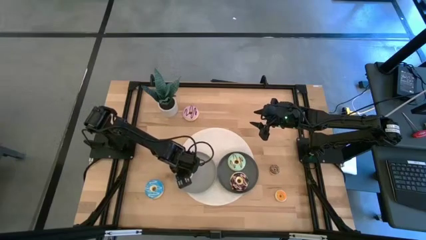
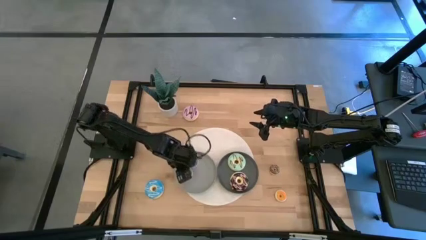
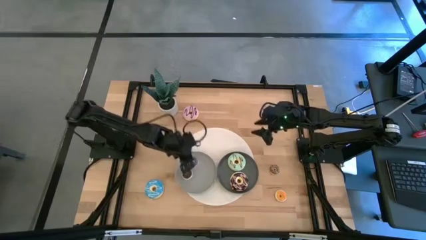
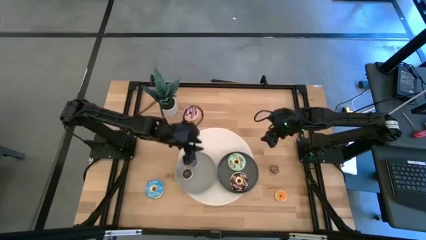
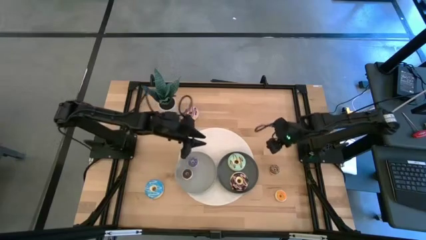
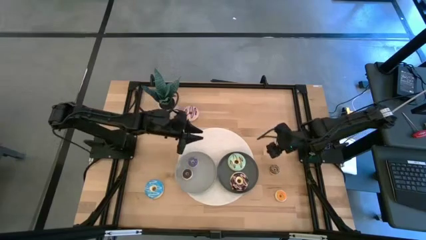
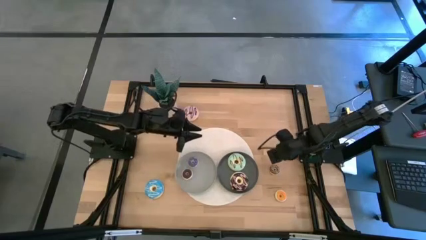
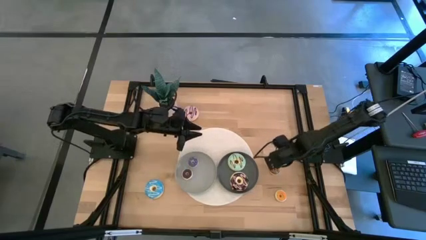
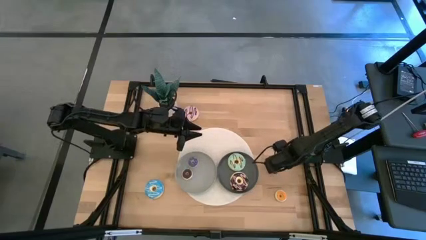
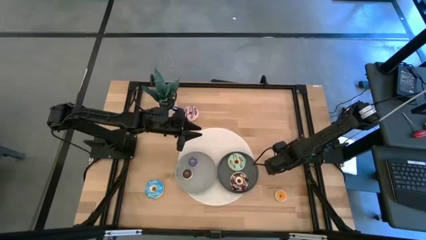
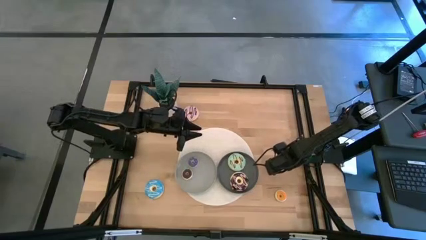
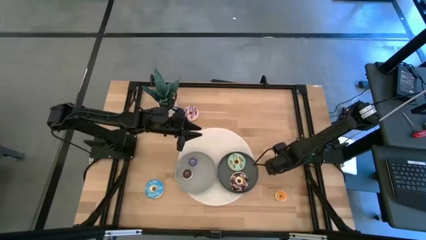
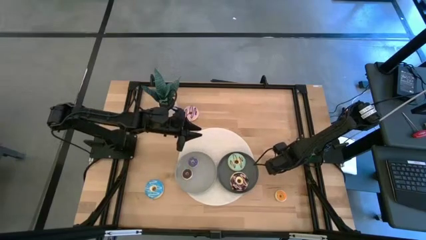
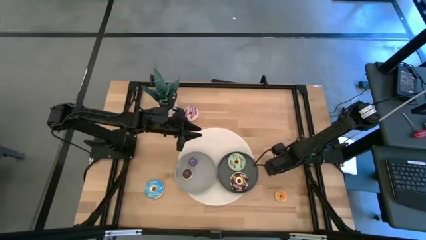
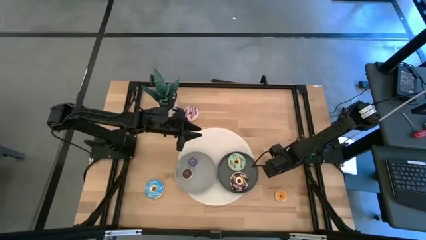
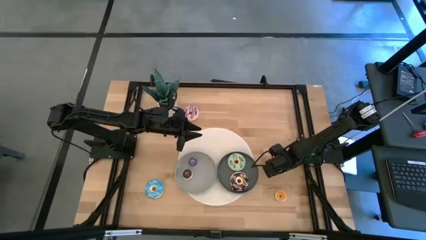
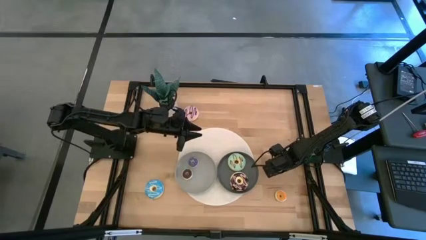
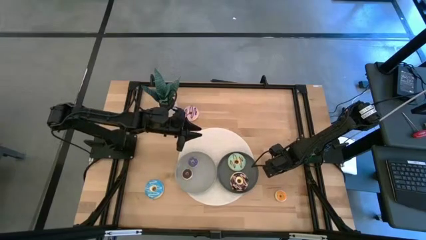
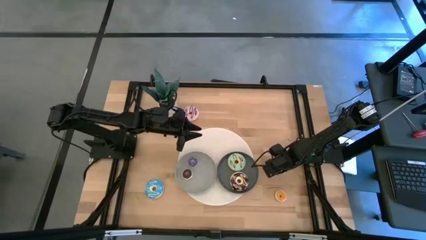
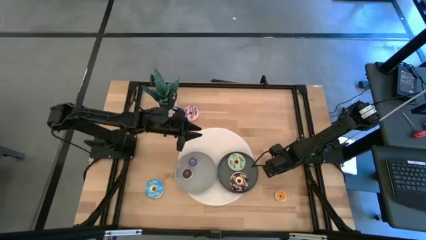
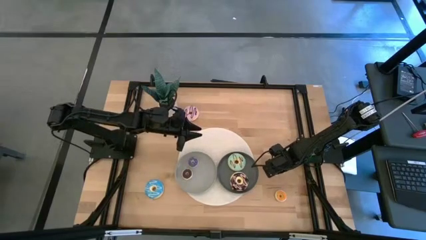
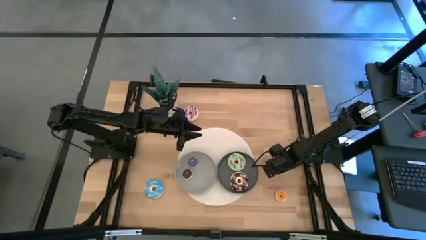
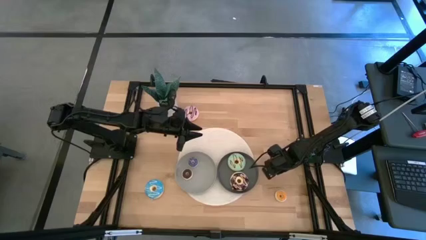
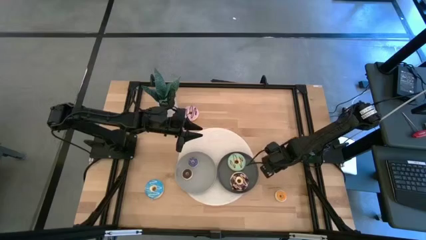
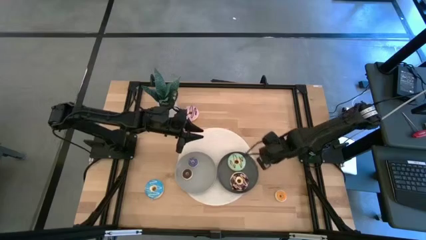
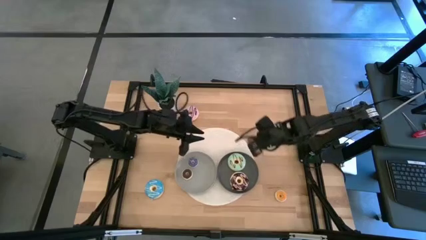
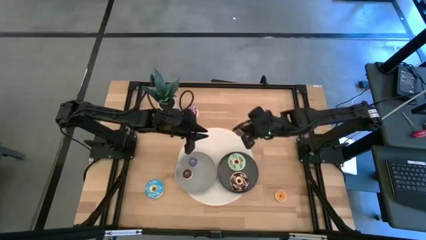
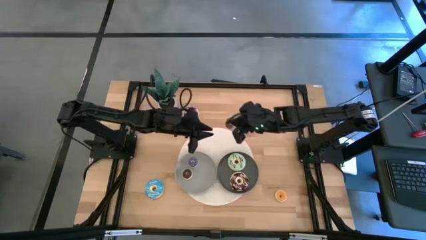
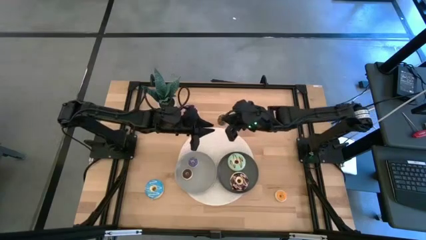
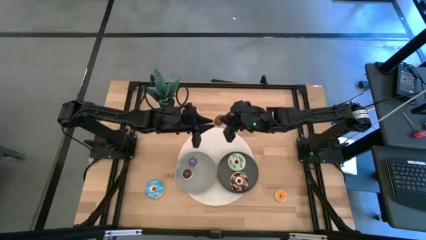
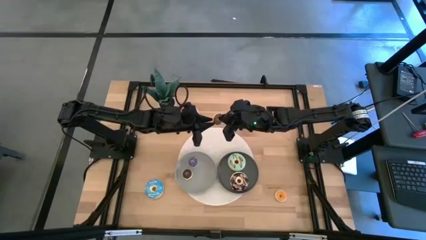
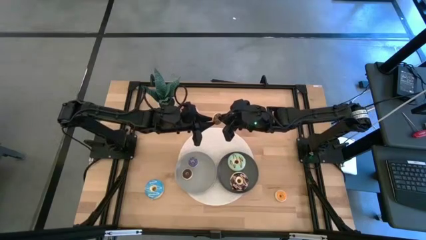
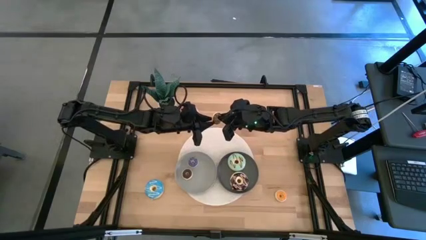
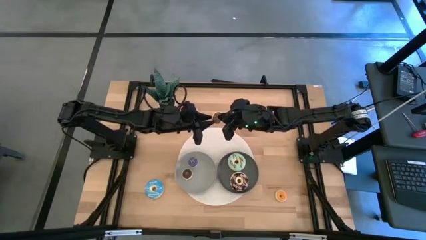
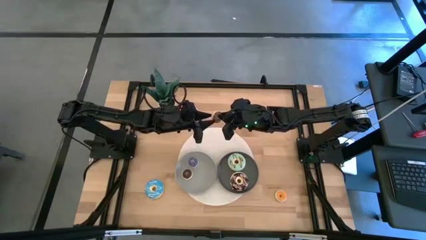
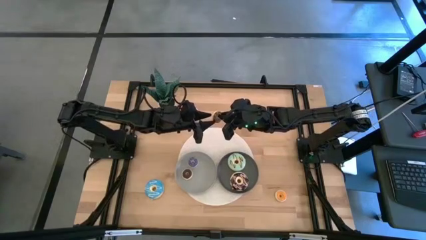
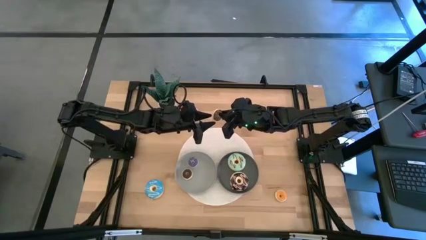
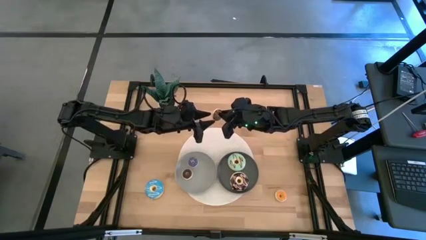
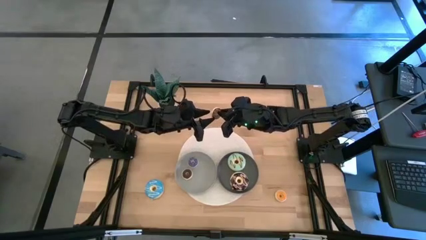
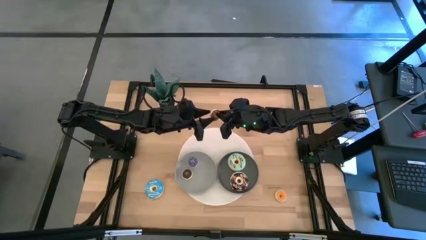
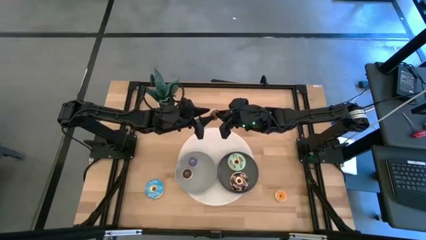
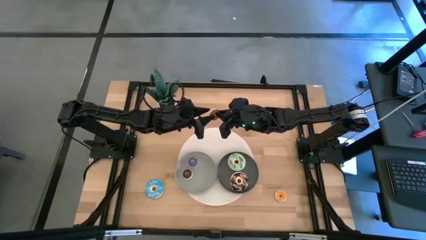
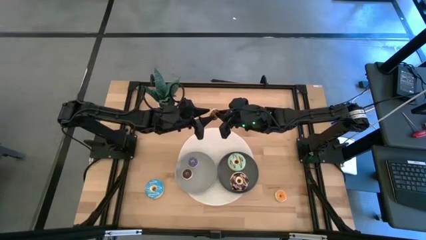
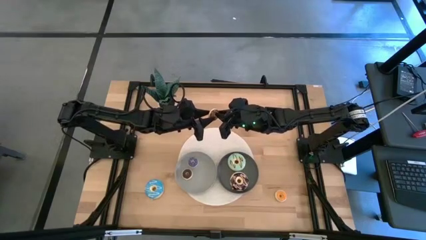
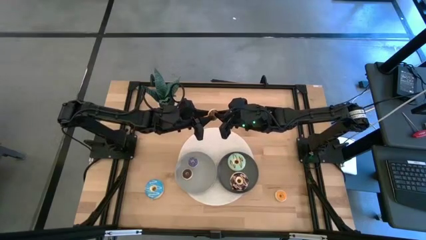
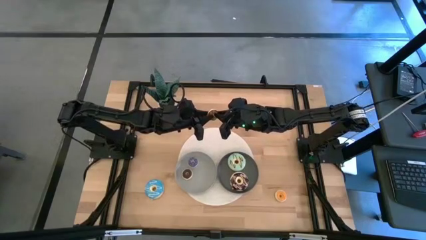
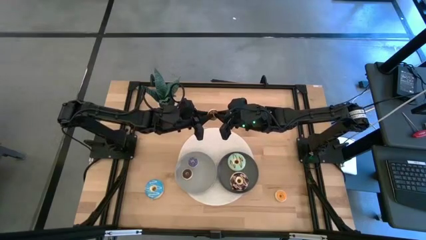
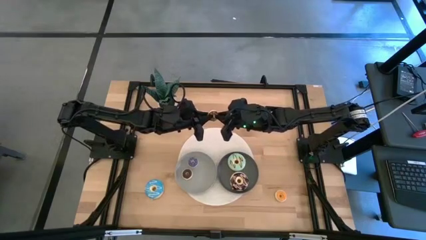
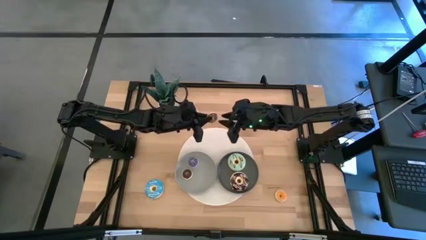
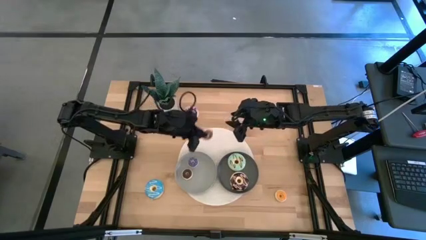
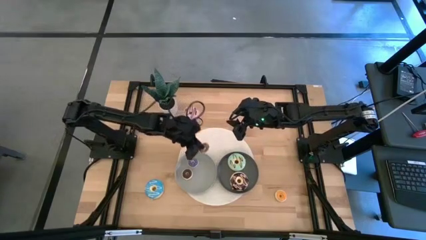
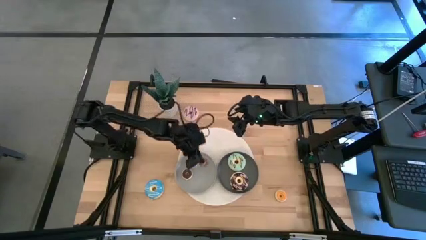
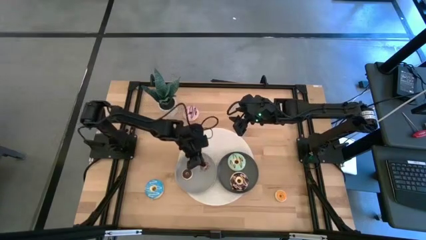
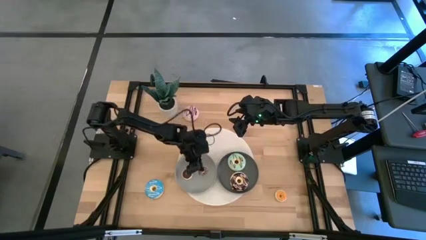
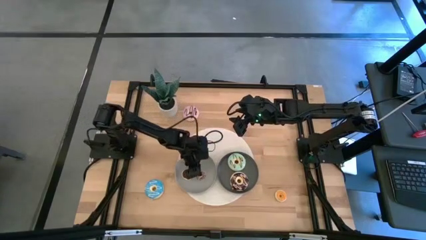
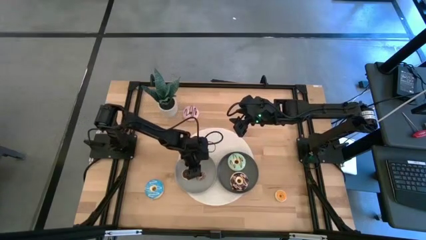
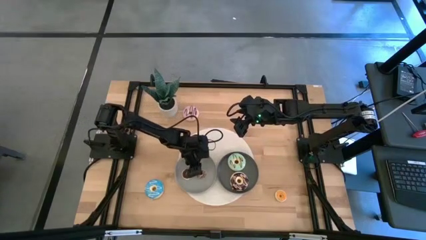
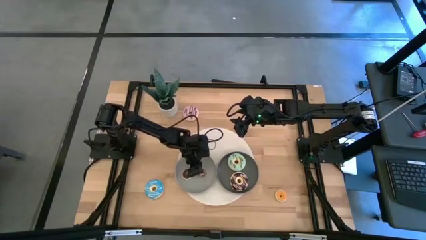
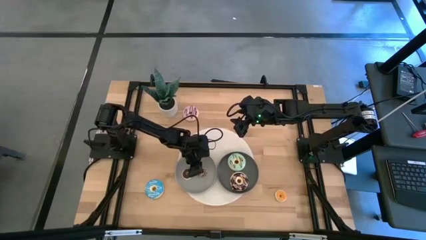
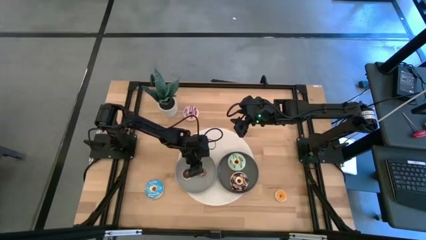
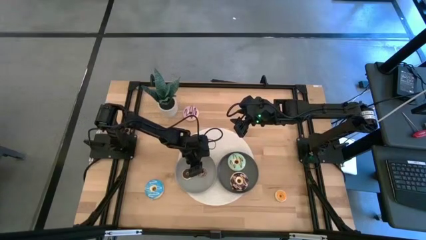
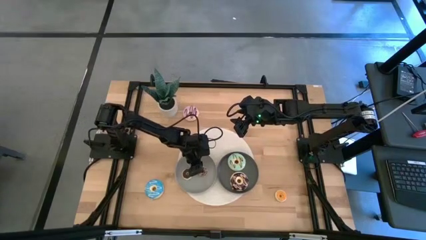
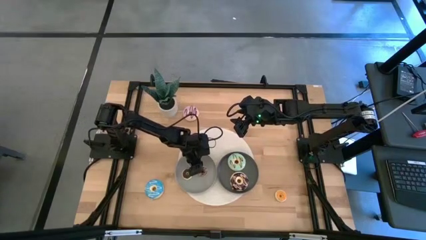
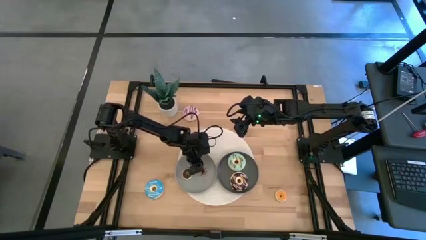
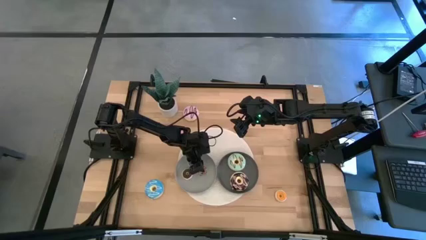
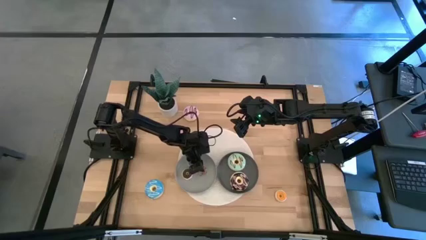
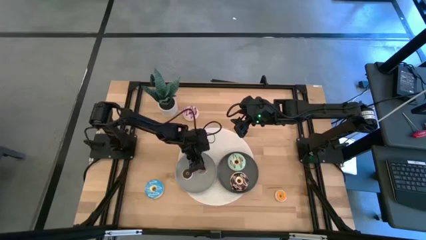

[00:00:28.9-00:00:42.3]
Task: Pick & Place donuts
Put the small brown donut on the light gray plate

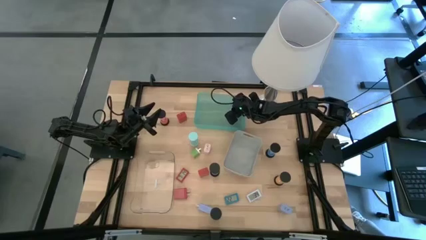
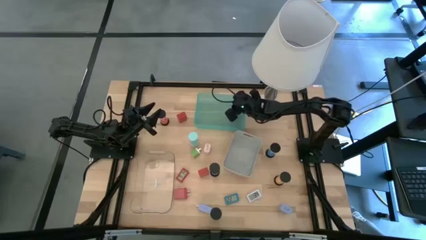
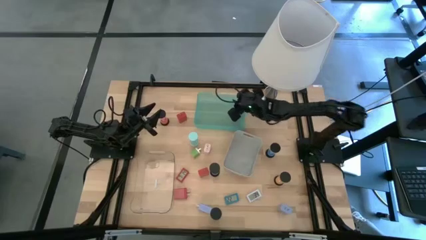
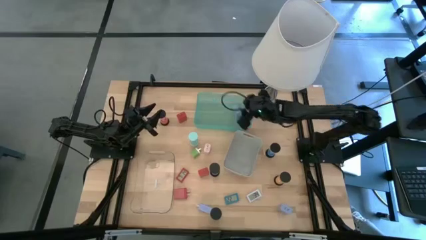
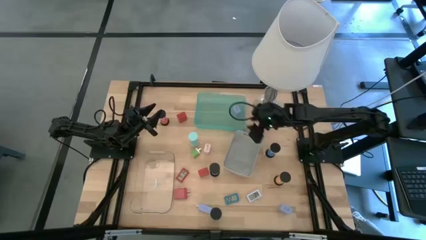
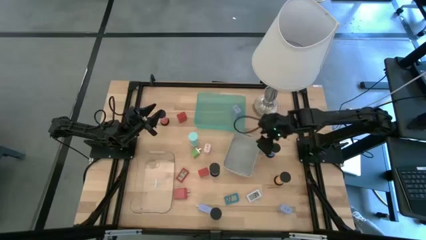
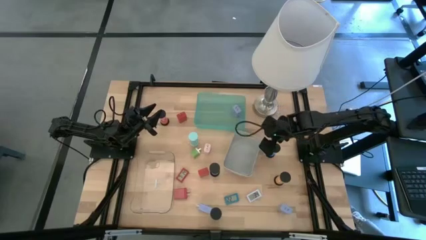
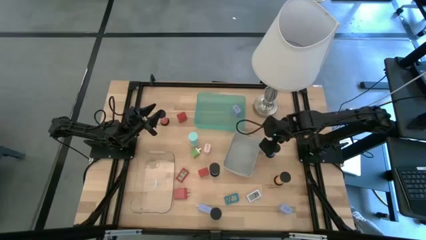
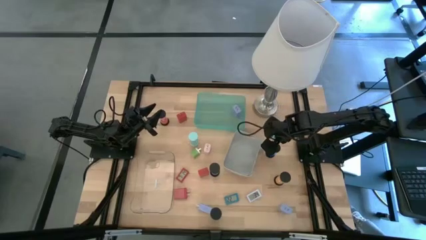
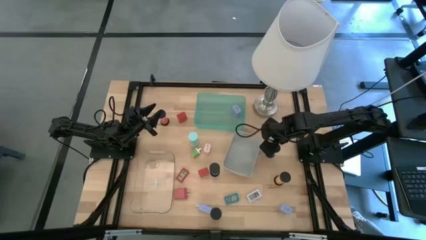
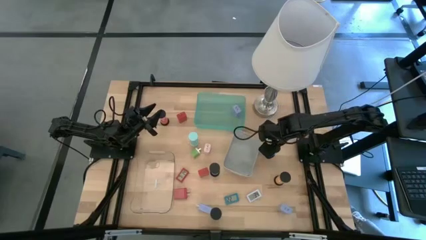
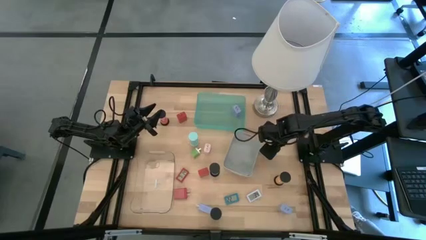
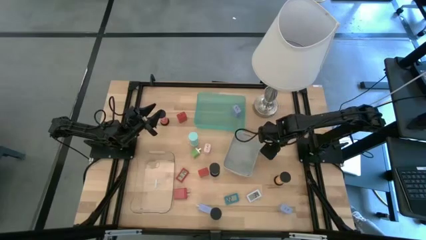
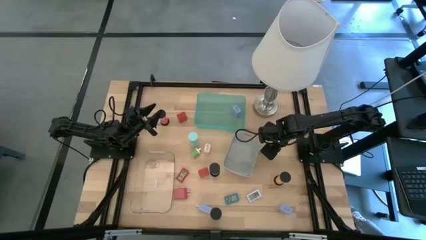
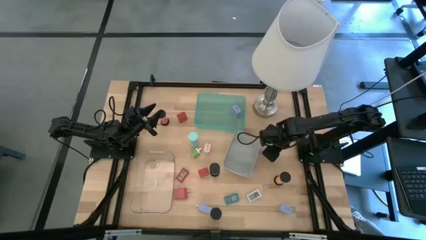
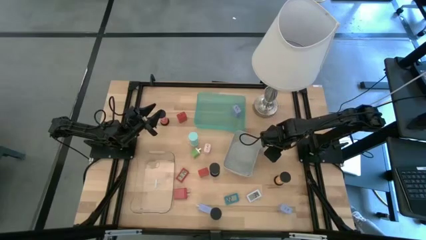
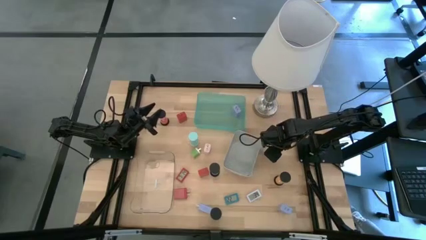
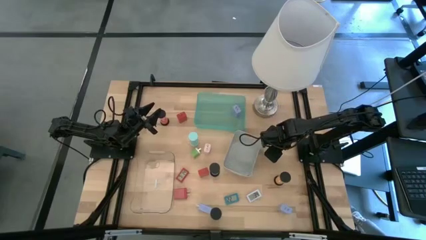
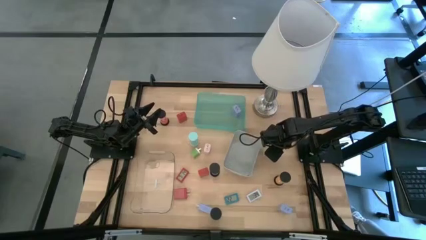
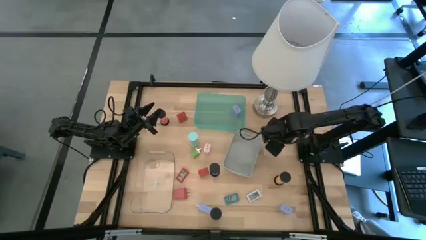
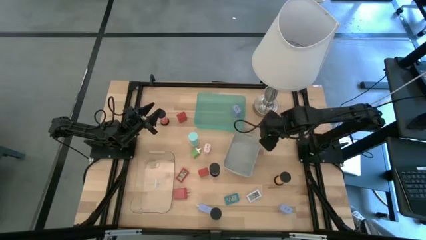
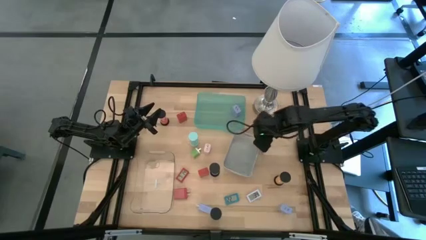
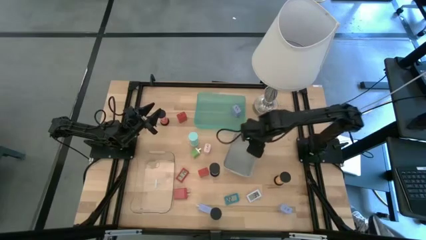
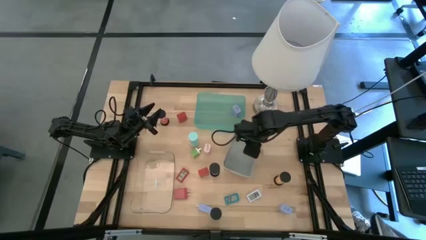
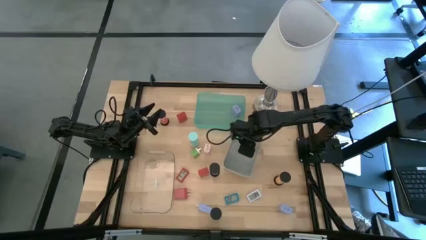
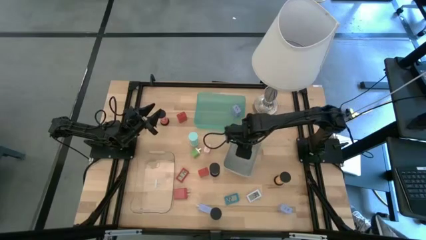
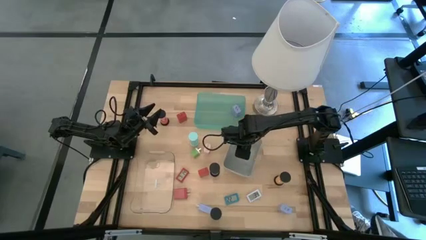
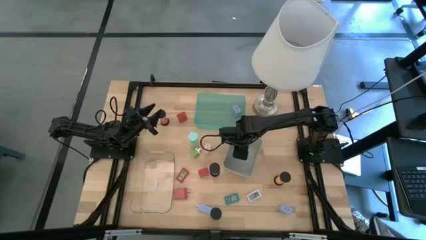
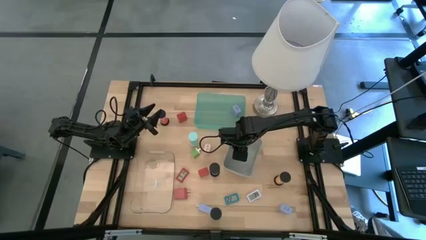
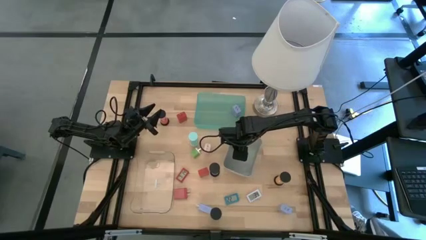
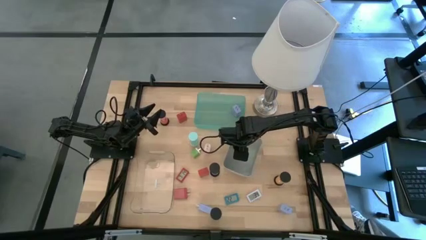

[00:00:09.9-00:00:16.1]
Task: Pick & Place Office items
Put the right blue hourglass into the gray bin
